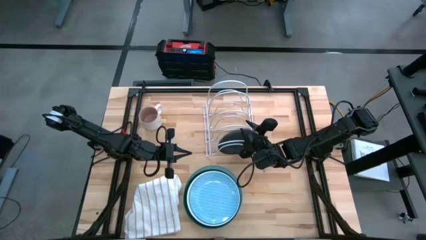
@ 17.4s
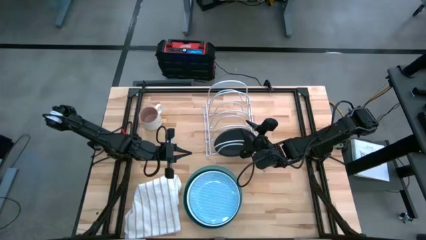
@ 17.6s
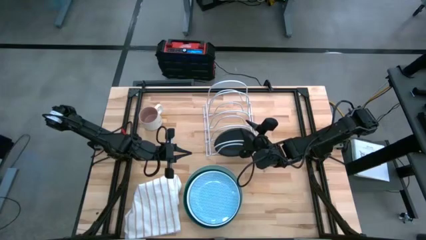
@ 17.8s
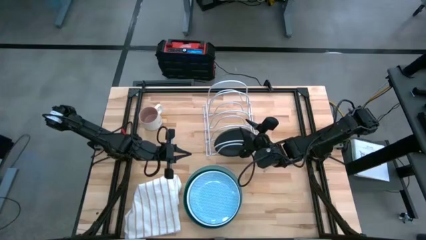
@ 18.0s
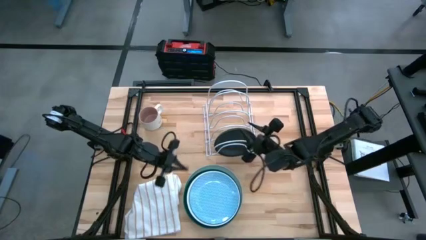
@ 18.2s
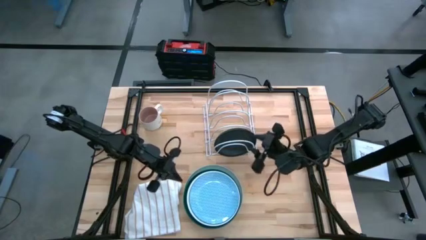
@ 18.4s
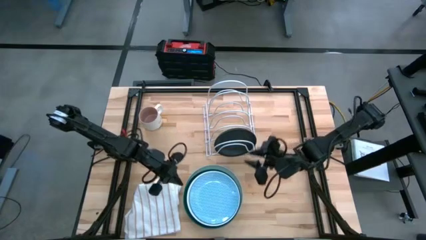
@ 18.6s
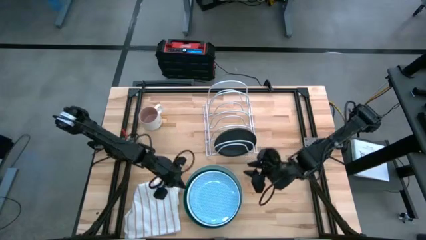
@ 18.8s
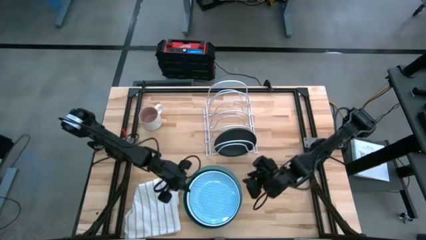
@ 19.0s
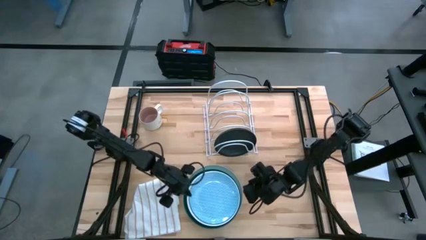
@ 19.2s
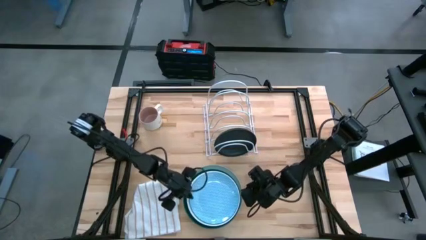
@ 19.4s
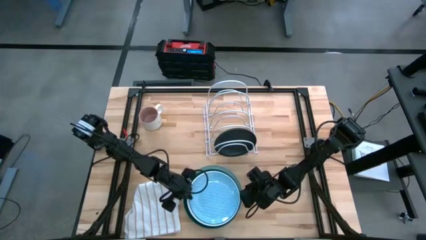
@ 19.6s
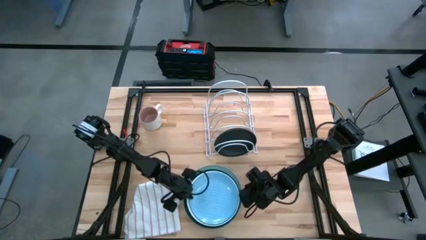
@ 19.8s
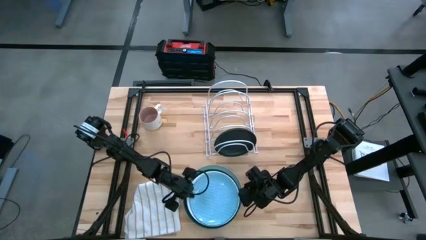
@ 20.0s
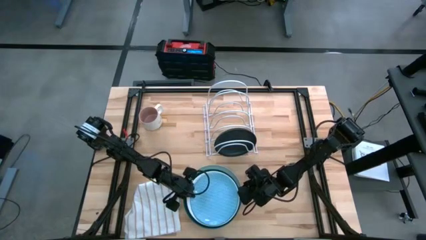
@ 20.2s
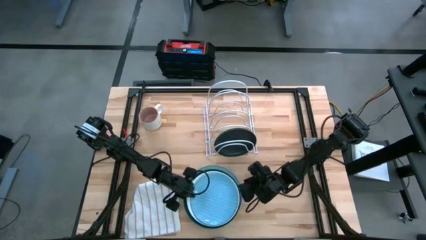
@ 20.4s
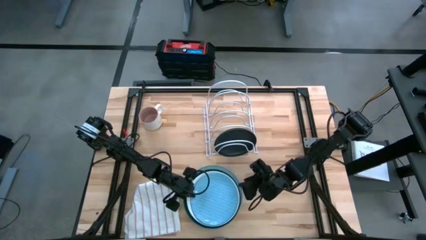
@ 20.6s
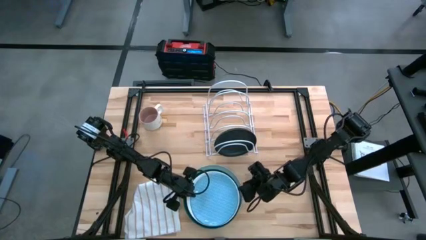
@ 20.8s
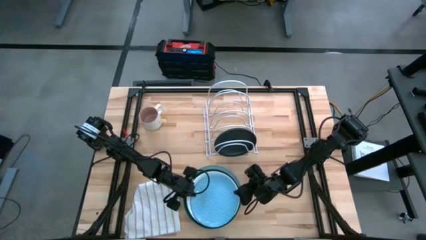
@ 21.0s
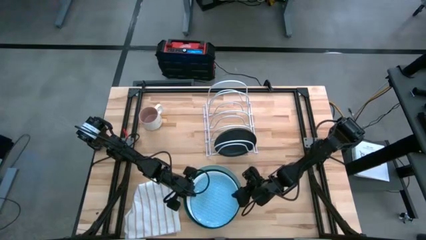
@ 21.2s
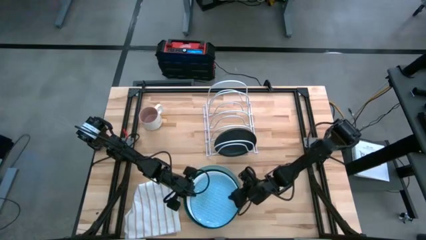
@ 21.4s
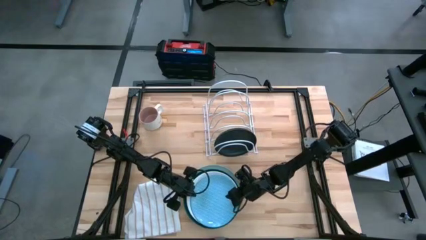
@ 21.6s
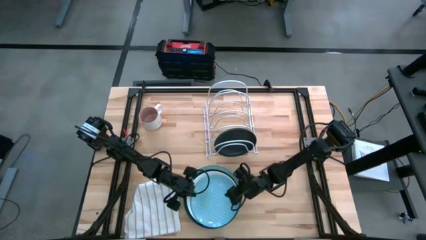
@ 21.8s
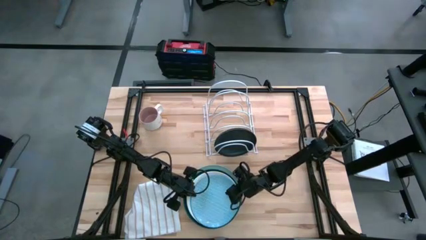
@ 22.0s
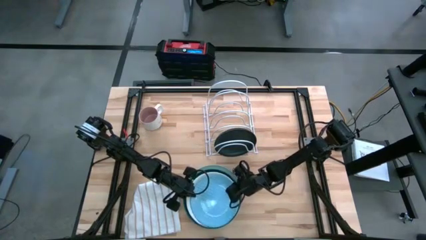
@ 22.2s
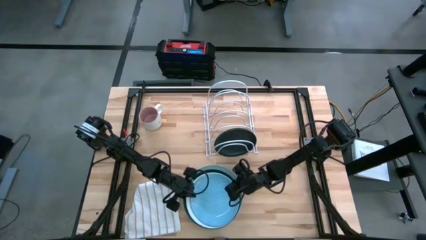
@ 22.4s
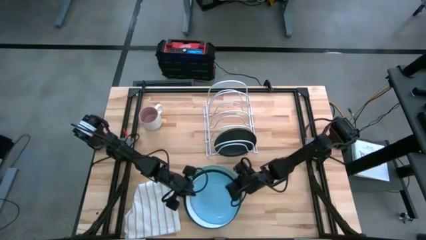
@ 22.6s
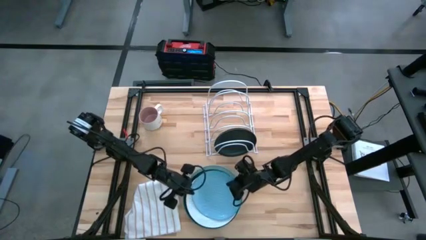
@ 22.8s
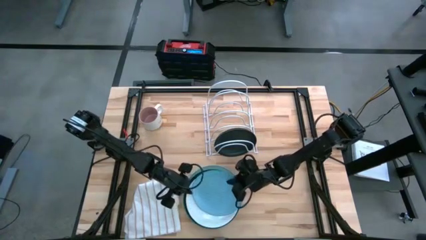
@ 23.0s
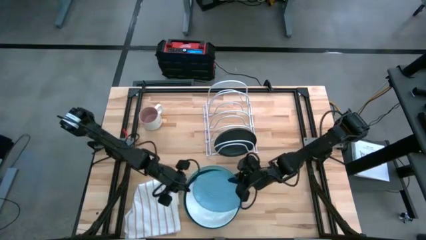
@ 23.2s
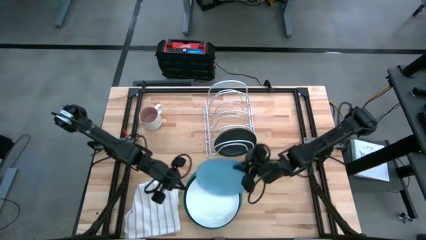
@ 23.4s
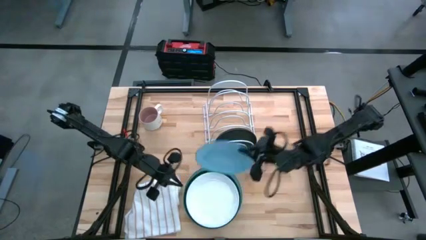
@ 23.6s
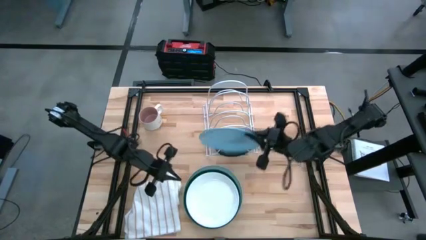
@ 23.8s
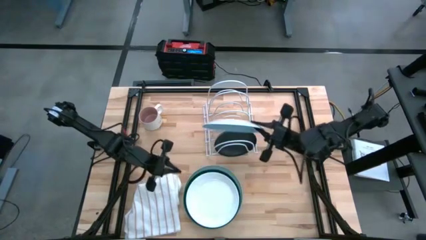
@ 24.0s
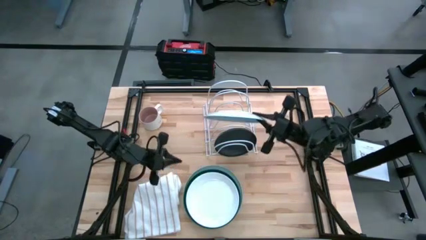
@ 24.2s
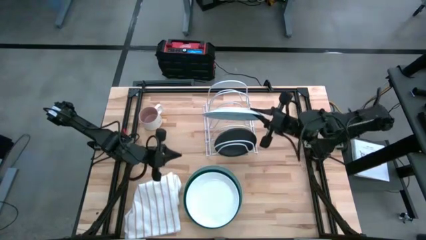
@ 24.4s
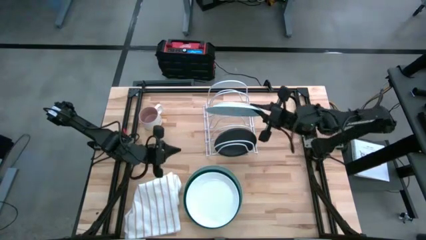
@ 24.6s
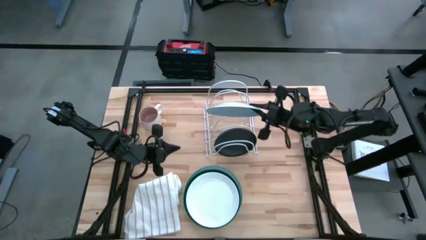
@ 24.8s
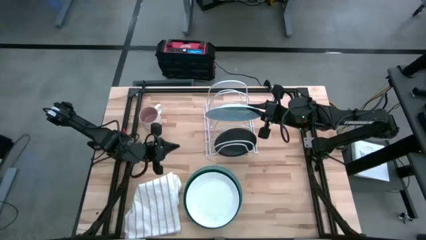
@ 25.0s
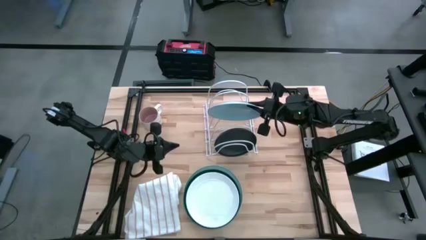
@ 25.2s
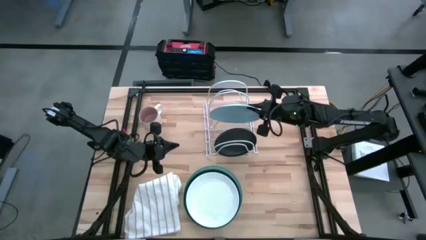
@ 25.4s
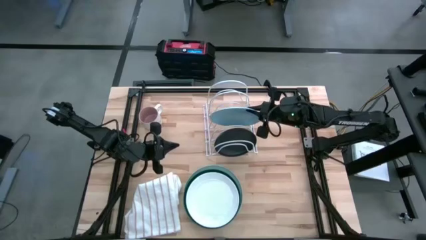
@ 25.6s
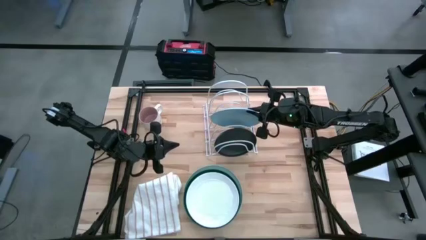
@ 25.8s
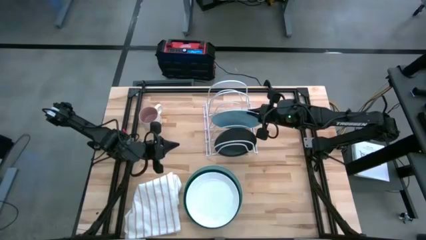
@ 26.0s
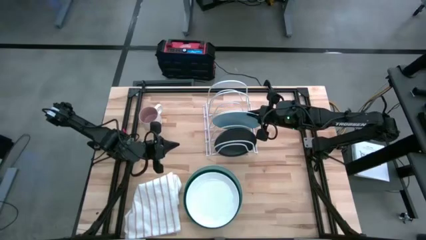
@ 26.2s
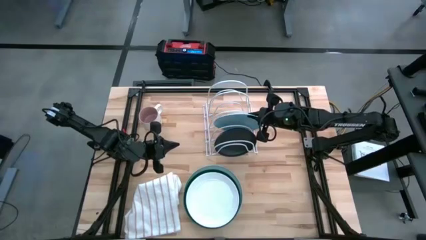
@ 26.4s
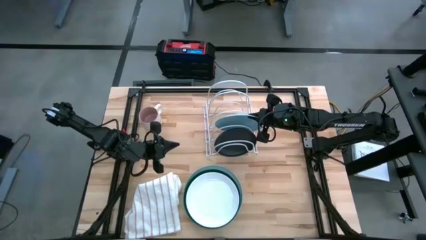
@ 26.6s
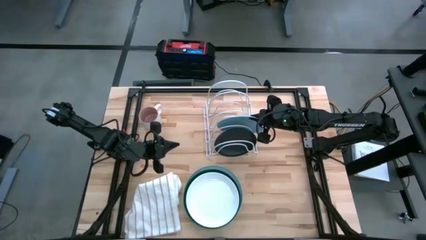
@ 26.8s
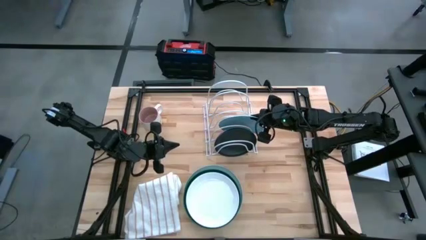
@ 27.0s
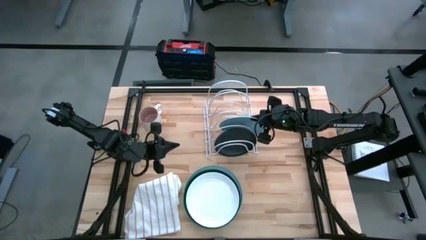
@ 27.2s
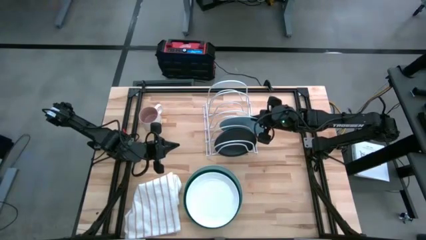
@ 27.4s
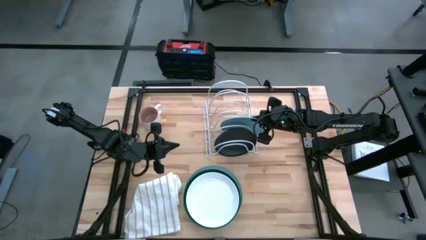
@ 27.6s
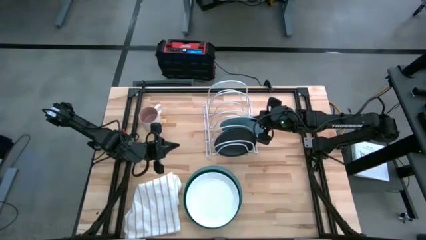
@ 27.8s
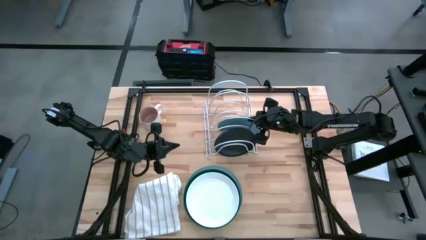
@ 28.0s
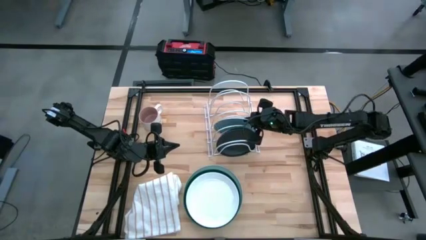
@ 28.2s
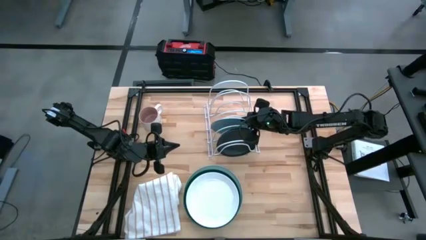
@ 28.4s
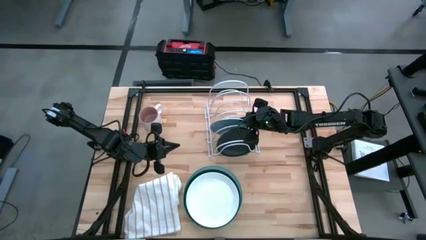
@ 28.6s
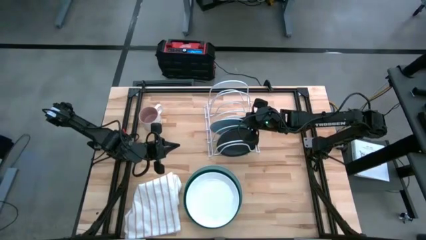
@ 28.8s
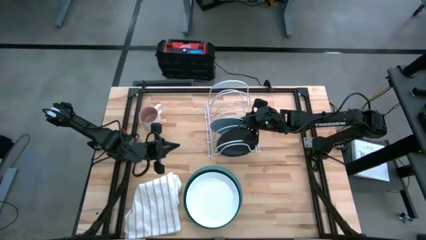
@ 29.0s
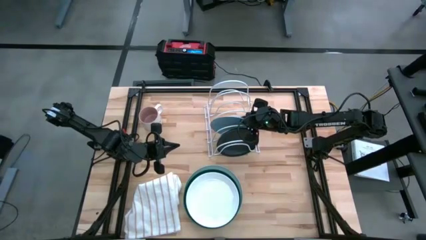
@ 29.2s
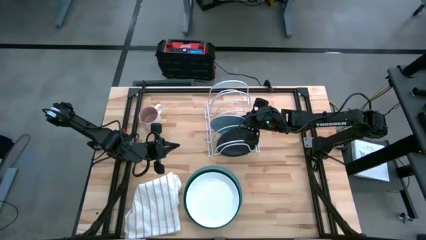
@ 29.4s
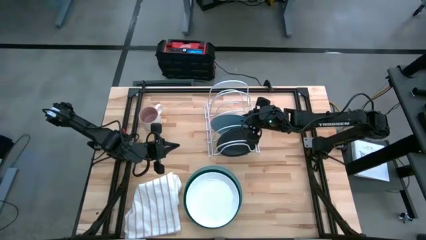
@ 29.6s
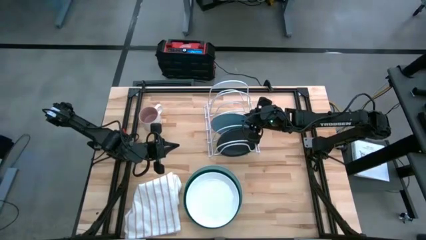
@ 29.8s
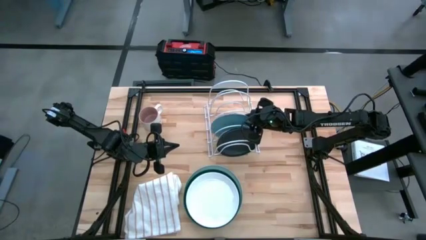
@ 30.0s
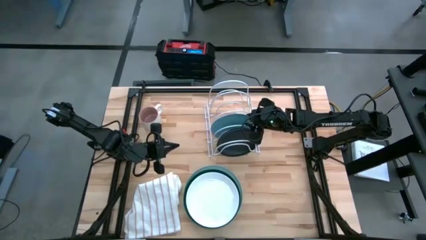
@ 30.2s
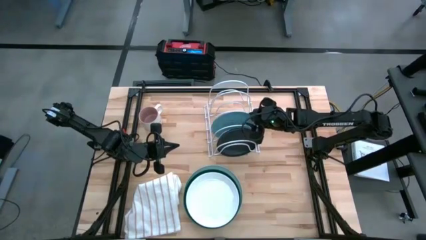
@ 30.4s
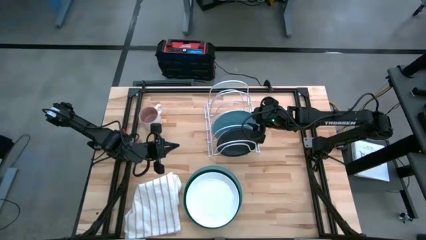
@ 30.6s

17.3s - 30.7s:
Task: Sort dishes
Put the blue plate into the dish rack

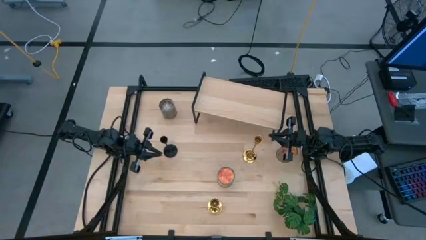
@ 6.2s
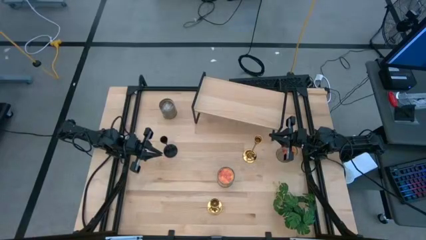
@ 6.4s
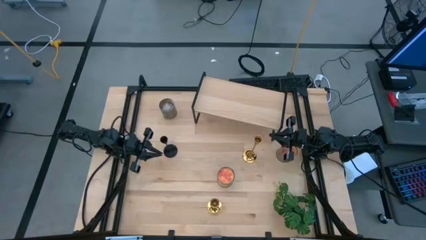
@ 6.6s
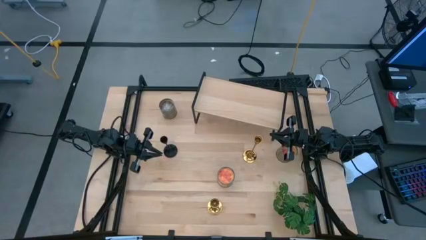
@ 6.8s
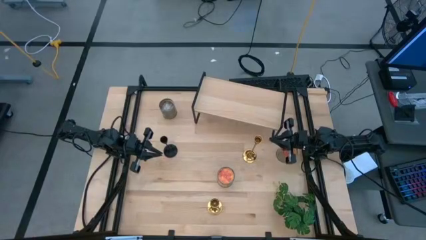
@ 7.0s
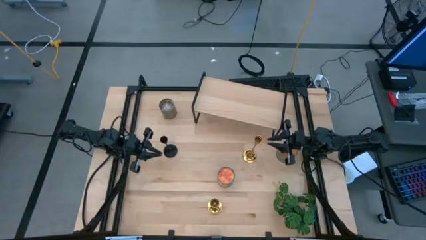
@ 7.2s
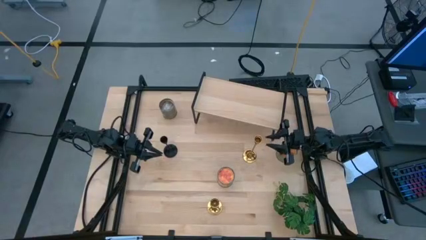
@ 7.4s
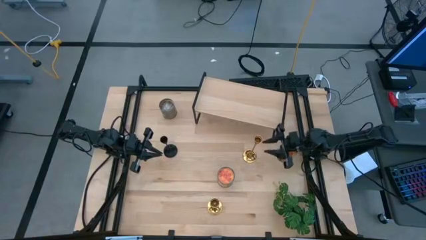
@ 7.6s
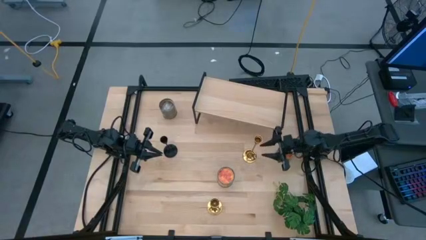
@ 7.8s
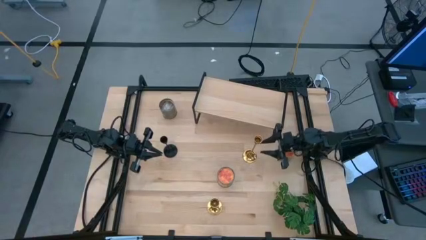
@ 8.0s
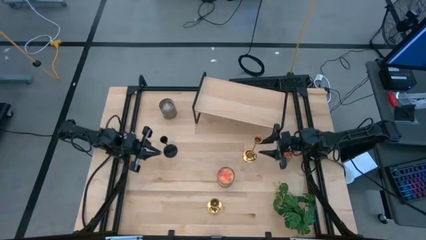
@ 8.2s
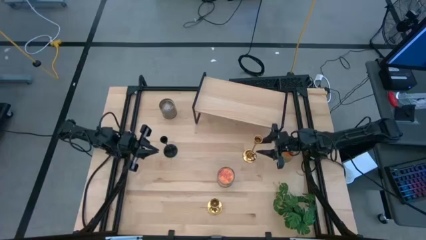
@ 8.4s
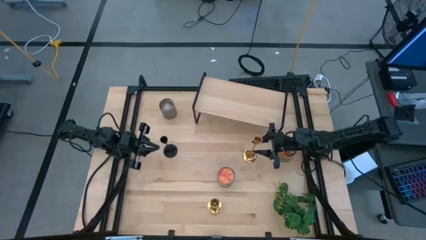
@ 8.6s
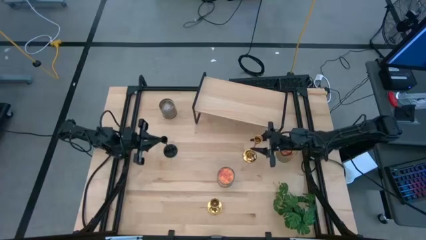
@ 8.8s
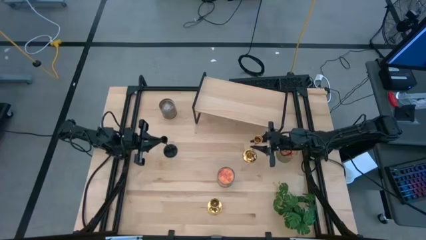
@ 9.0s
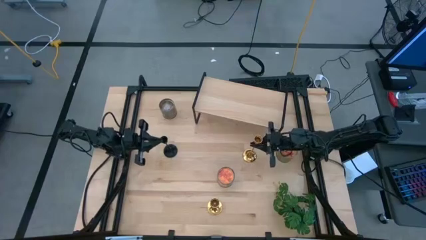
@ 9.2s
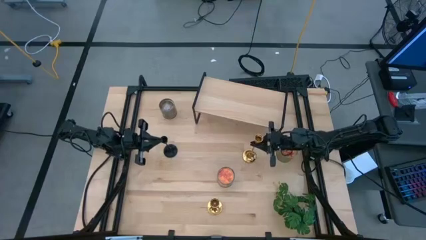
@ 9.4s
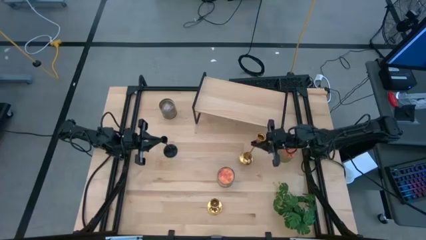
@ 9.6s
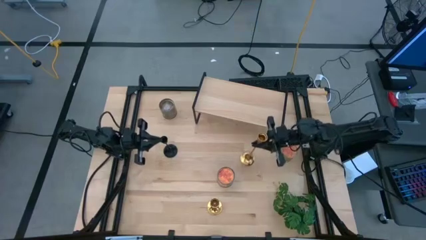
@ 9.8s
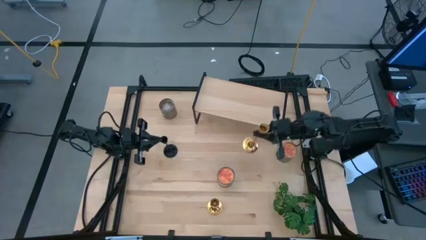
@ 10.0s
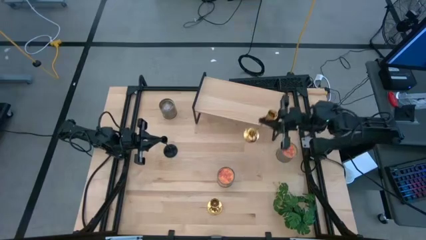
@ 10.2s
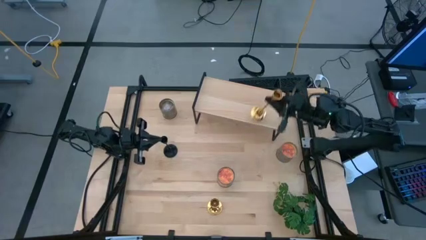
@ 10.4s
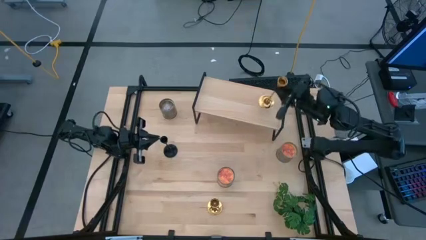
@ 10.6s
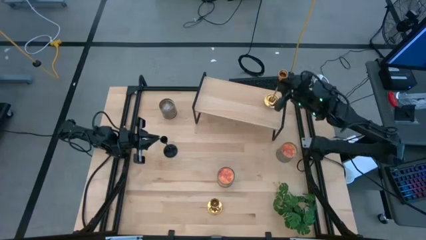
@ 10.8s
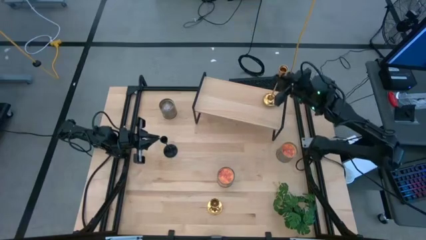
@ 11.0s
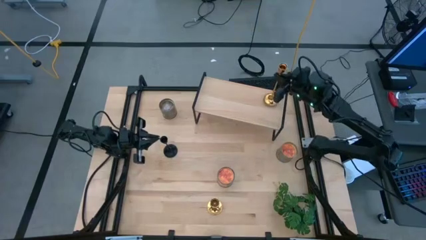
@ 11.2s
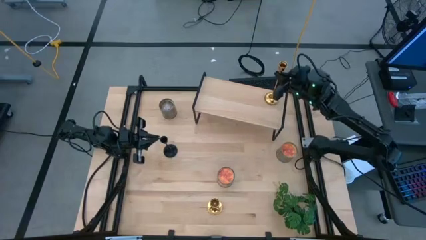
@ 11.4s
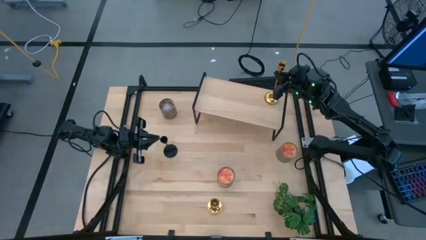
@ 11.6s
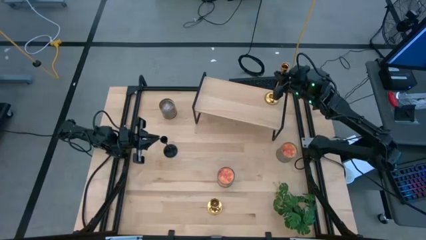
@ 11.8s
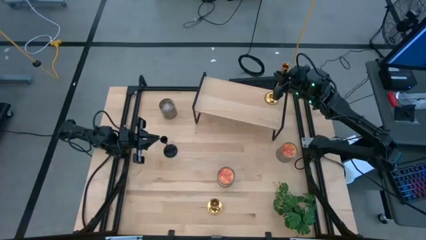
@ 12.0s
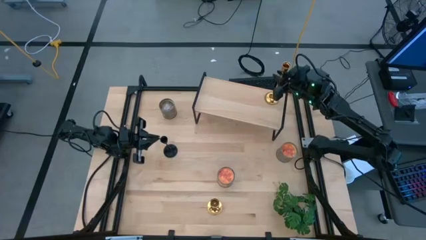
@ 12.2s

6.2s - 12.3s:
Task: Pick & Place candle stick holders
Put the top gold candle holder on the shelf
